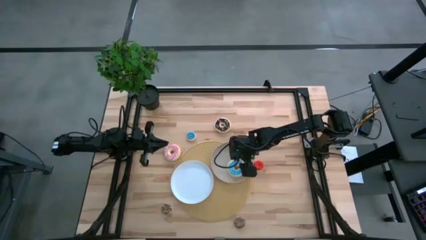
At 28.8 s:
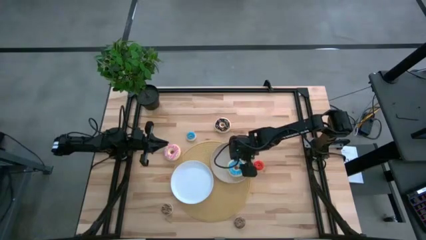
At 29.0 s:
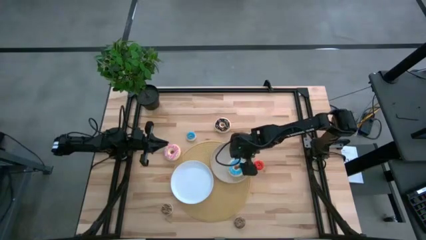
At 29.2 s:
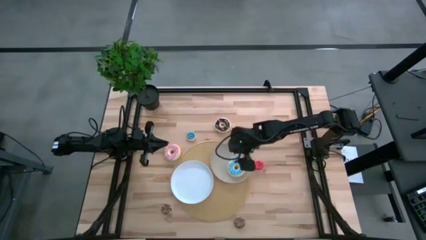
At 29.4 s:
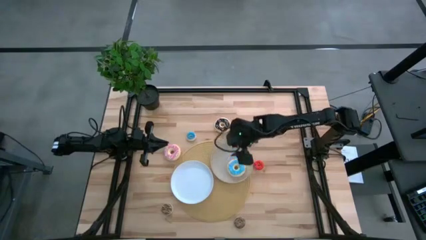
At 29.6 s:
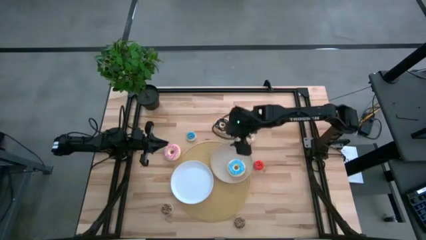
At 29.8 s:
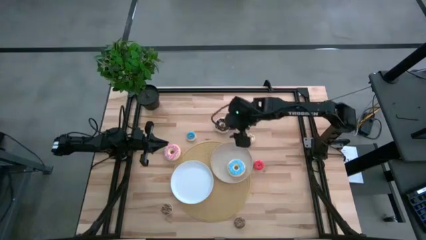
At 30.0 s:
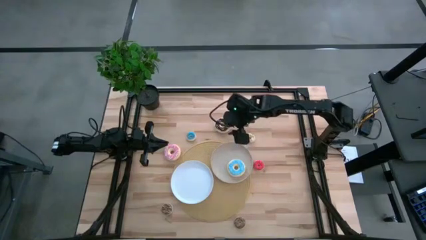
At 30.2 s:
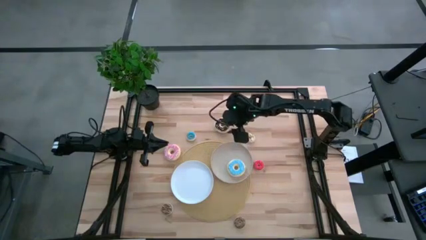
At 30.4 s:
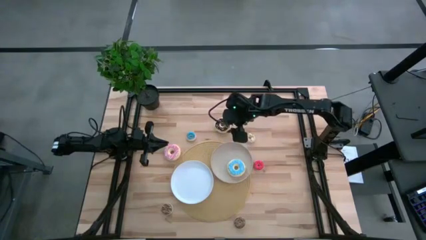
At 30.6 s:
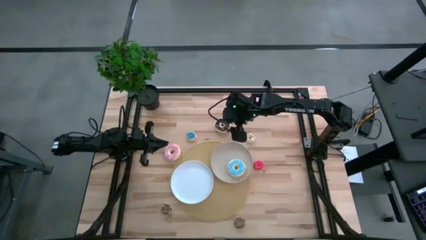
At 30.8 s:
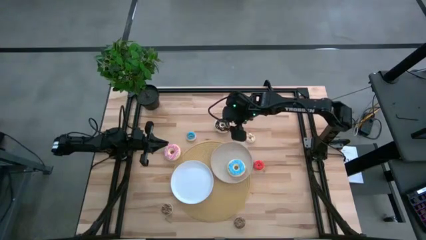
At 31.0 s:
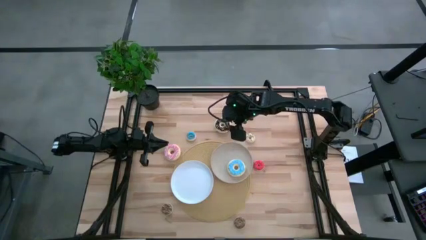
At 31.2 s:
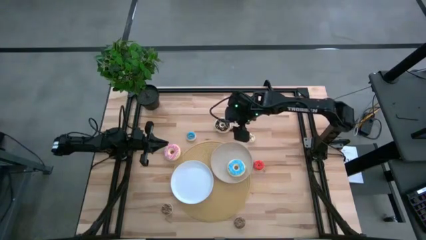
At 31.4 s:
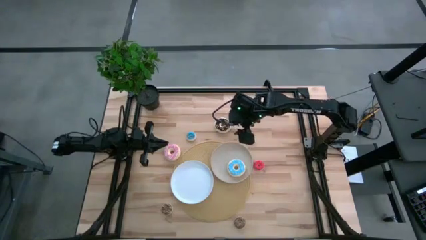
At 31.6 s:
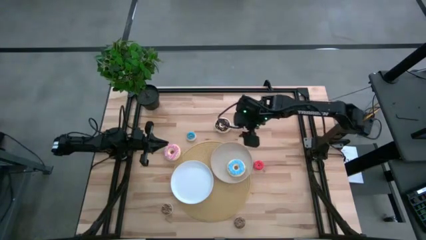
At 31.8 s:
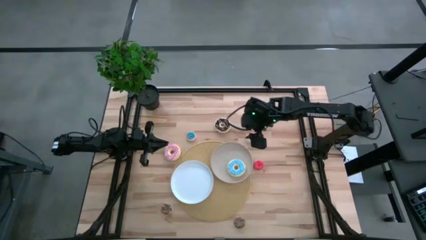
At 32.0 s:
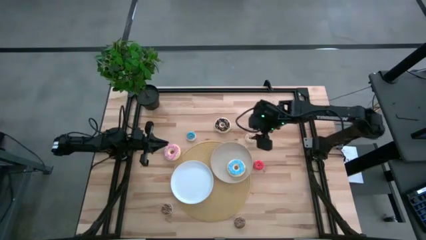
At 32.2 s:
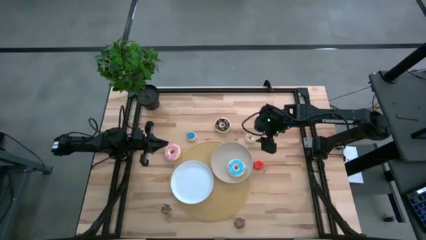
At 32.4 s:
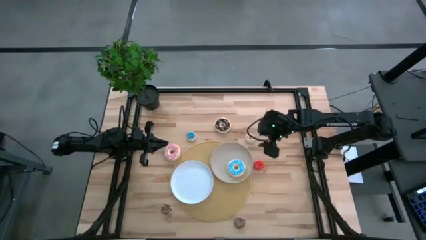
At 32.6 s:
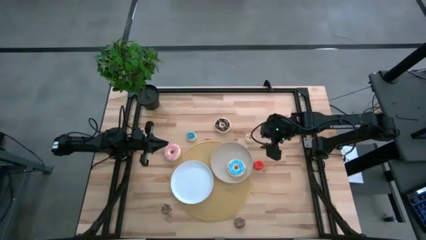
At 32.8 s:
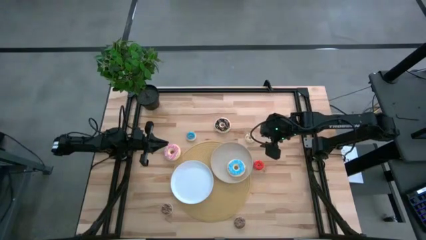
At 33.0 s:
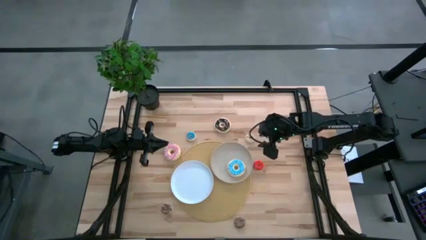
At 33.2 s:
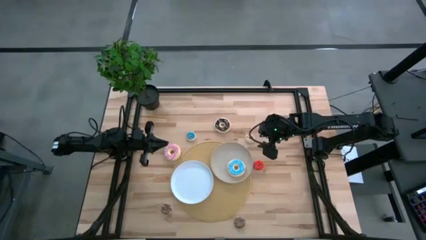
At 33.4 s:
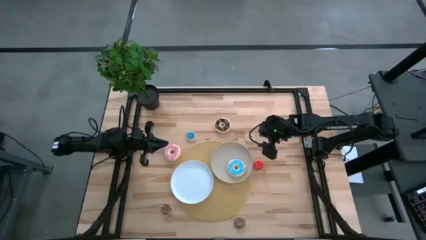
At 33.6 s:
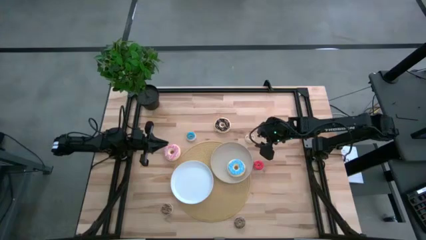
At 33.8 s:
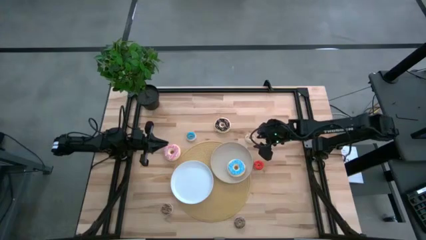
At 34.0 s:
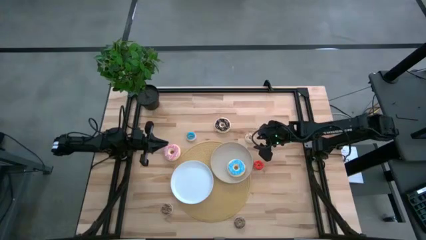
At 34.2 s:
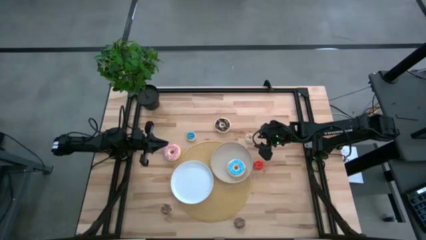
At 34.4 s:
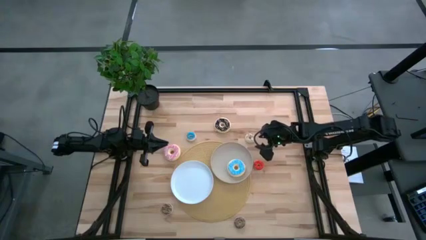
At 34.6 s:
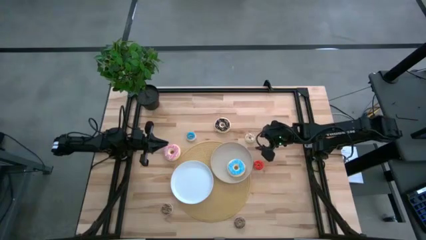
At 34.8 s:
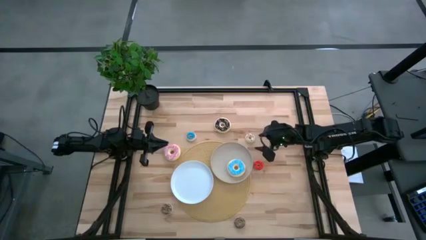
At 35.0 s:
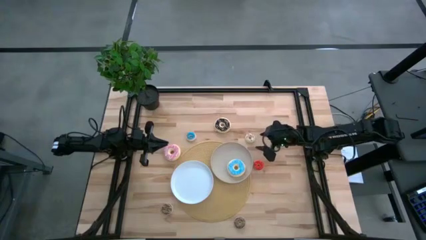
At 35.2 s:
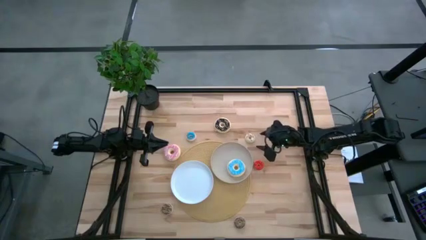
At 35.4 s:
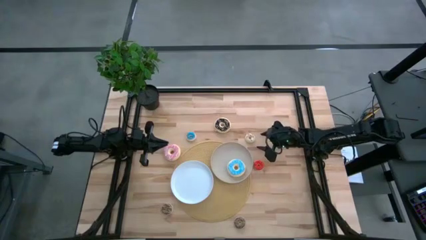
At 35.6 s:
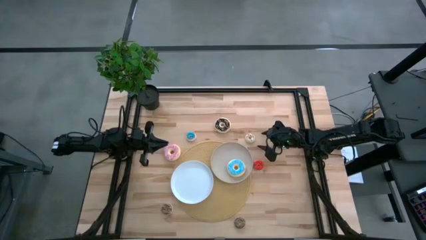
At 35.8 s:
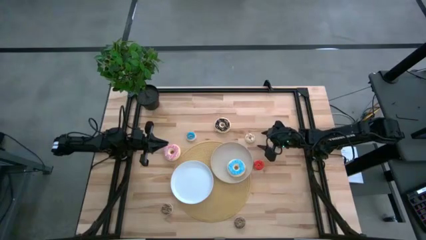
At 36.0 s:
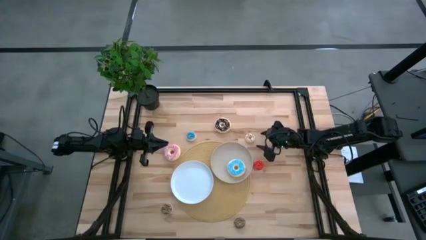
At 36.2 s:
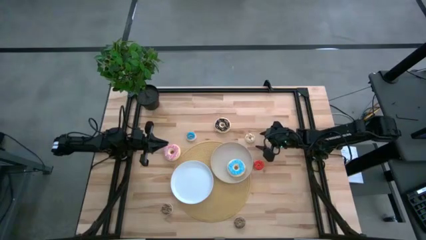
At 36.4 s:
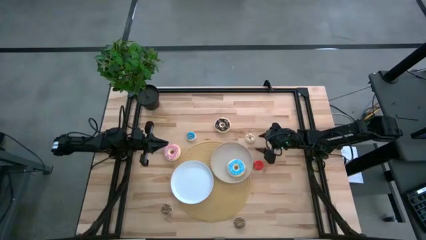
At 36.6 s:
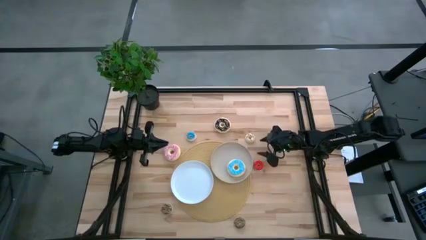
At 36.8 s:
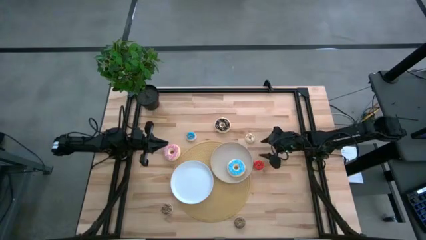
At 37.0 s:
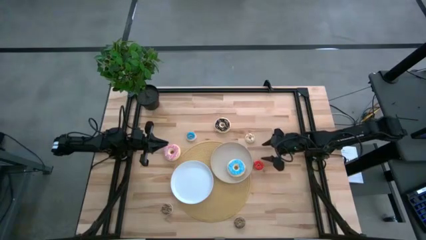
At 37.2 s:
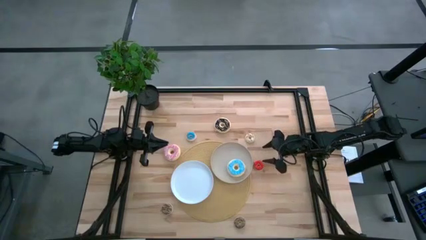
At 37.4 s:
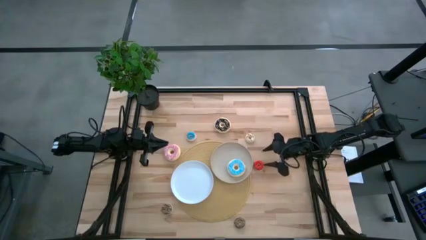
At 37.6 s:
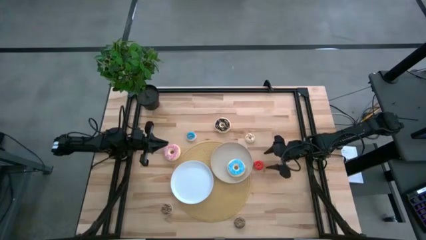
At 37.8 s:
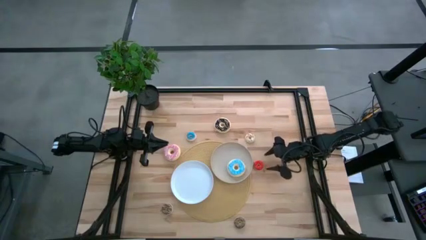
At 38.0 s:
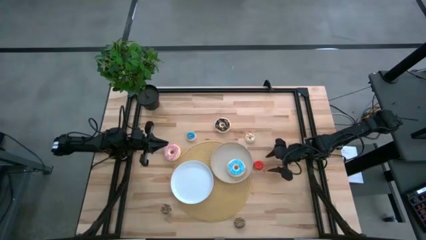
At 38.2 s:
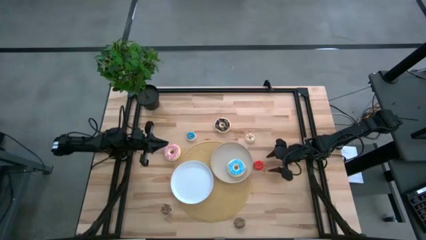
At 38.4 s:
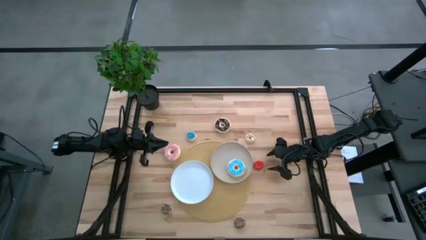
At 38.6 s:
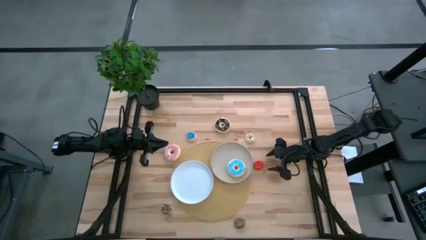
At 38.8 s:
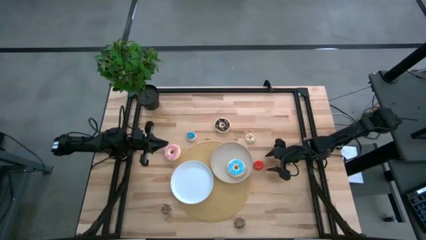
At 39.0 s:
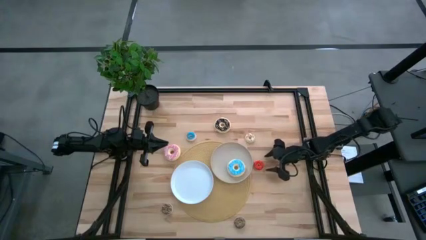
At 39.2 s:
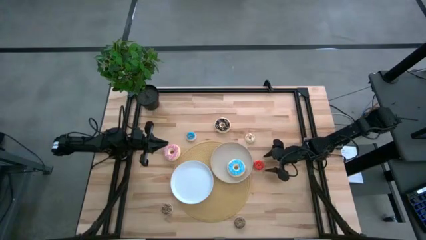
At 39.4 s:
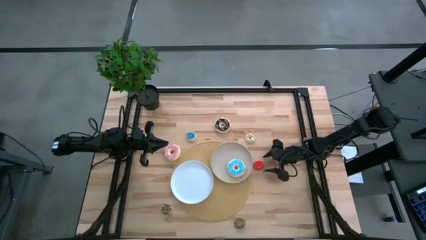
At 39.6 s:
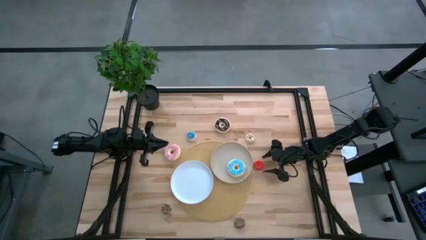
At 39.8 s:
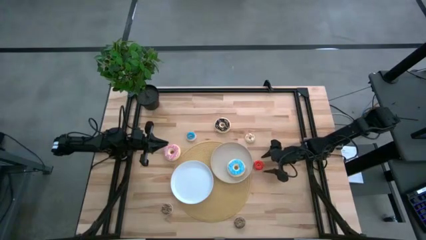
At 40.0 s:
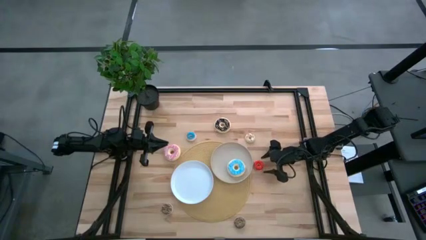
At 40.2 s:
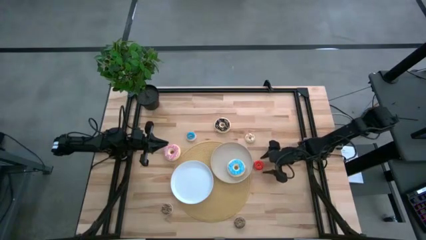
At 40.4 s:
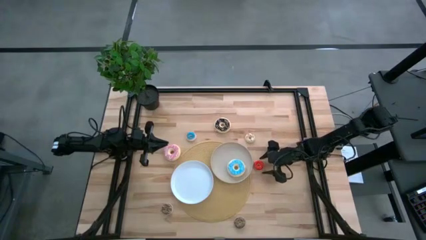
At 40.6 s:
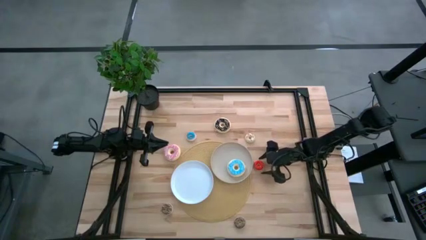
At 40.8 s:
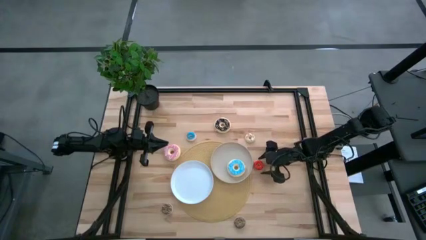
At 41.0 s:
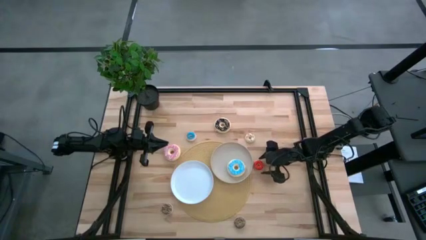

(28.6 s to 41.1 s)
Task: Pick & Place donuts
Put the small red donut on the white plate

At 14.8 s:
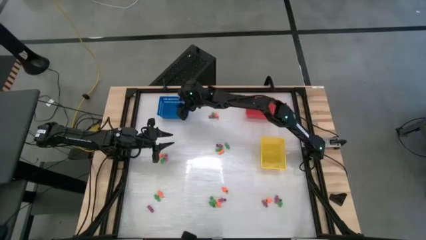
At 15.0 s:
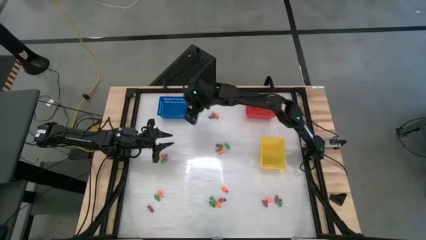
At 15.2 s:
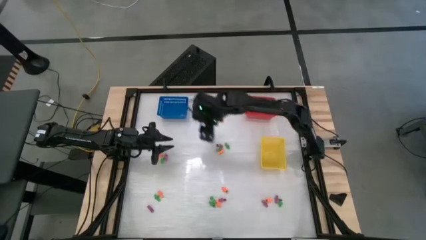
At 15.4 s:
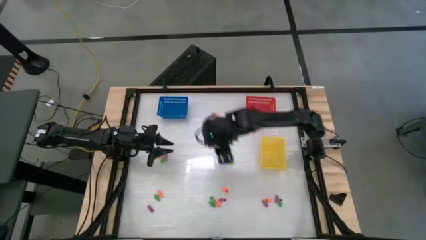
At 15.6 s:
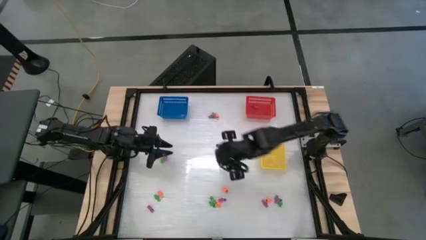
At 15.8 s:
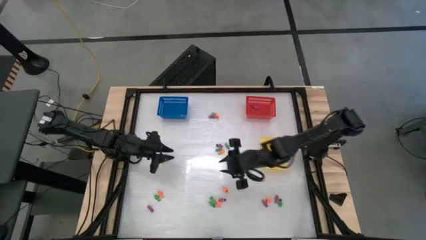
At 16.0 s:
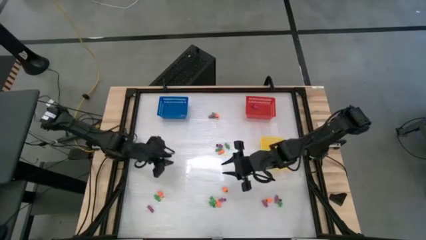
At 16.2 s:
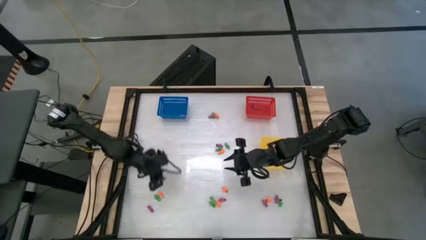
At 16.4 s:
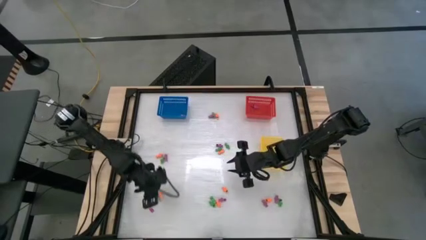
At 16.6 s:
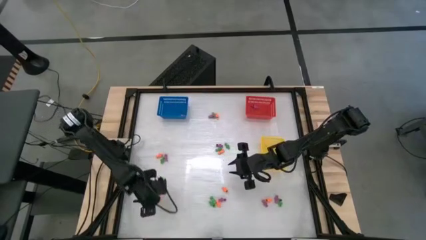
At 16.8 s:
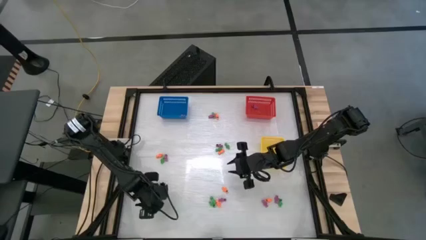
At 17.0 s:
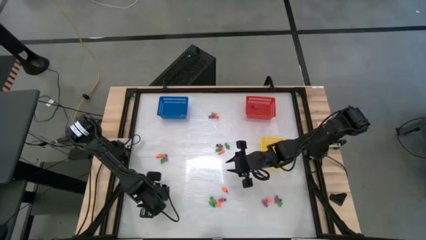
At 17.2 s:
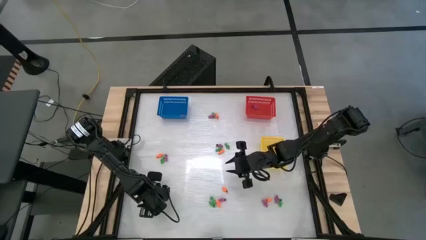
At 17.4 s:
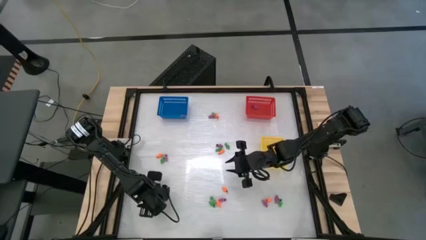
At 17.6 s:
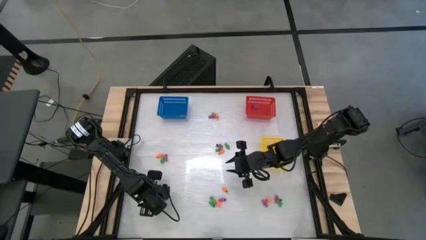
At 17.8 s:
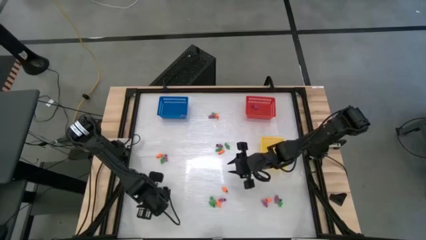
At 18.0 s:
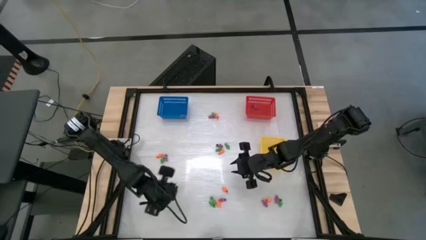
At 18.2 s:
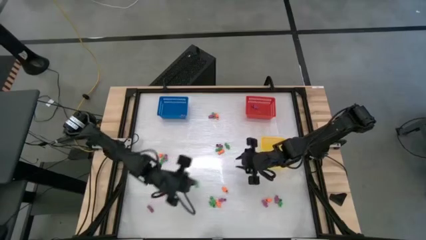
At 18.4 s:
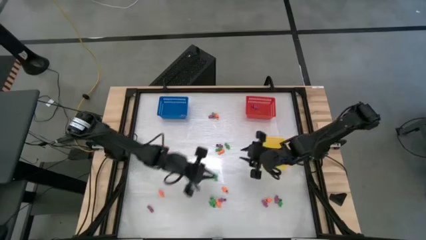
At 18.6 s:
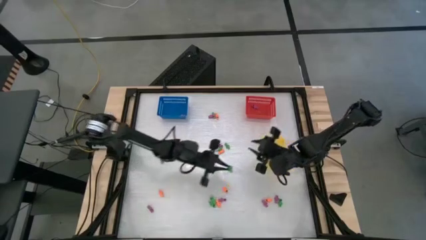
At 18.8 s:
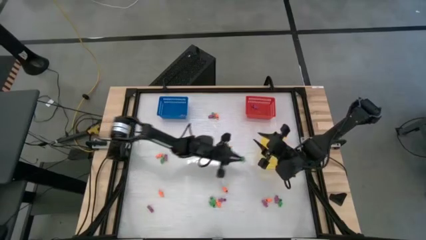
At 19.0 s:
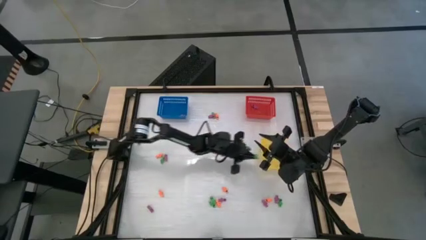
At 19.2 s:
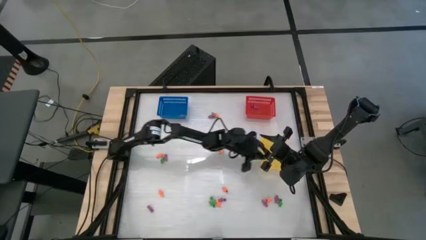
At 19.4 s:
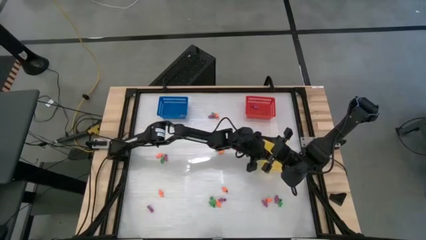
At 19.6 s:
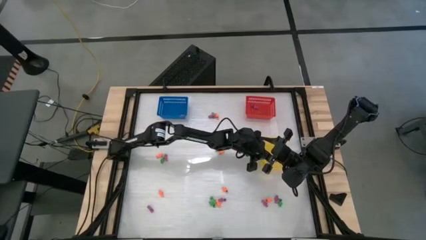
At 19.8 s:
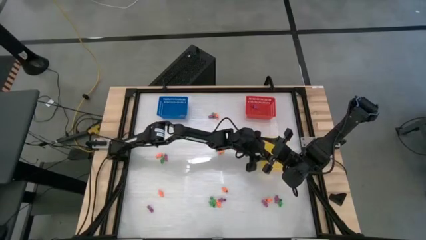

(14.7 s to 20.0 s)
Task: Sort Halloween decoration
Put the green skeleton toy into the yellow bin
